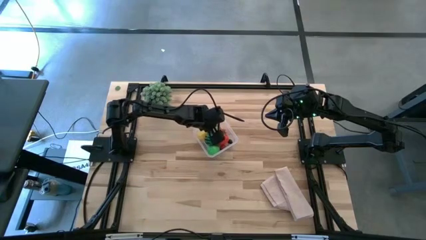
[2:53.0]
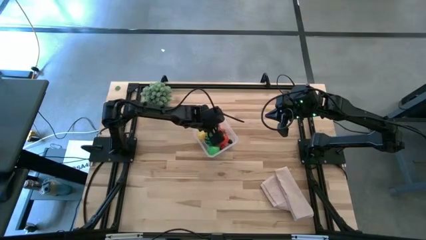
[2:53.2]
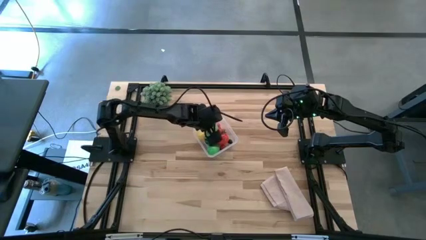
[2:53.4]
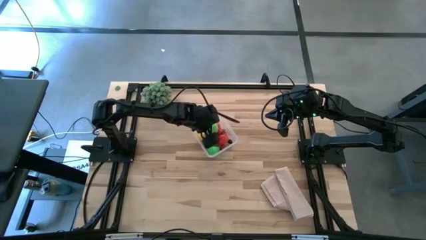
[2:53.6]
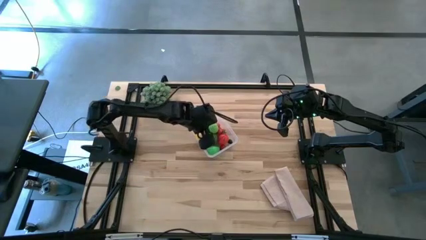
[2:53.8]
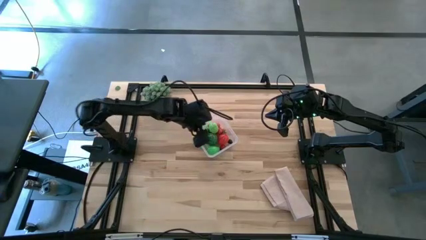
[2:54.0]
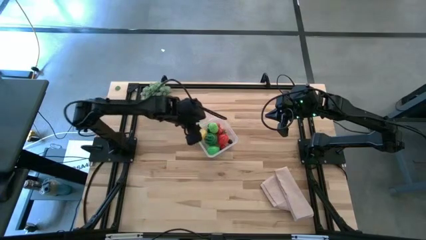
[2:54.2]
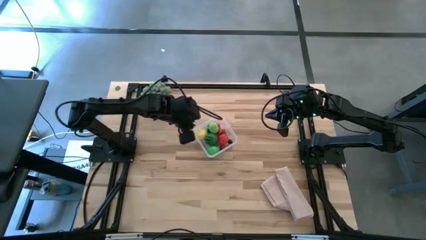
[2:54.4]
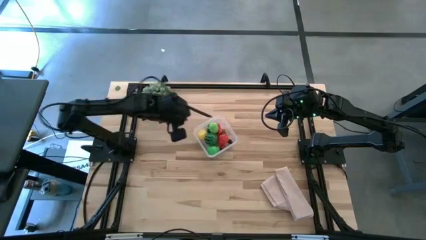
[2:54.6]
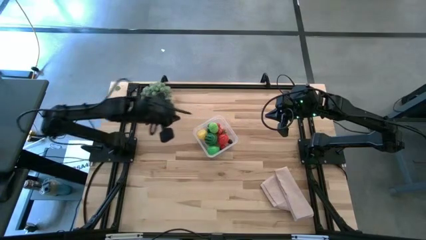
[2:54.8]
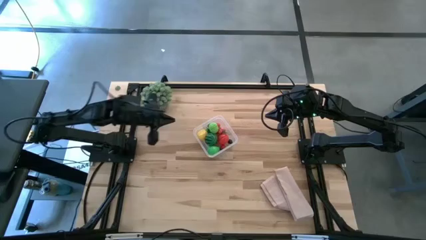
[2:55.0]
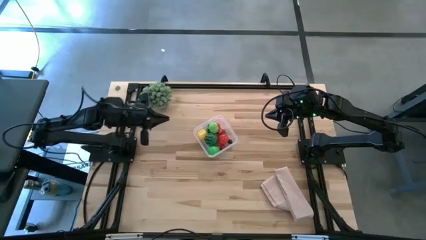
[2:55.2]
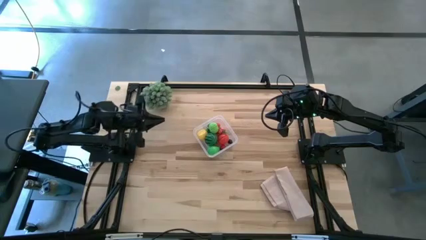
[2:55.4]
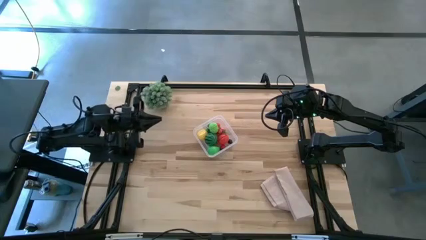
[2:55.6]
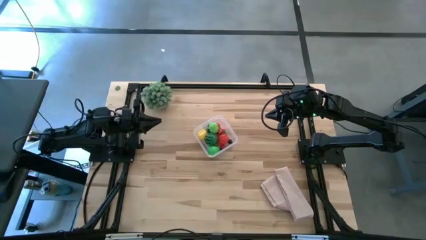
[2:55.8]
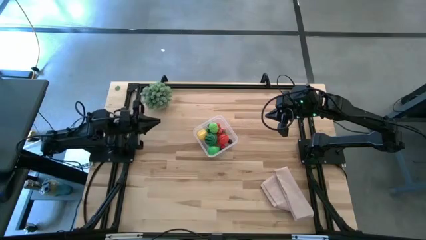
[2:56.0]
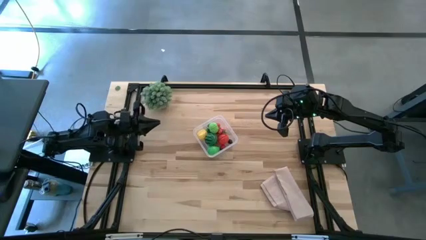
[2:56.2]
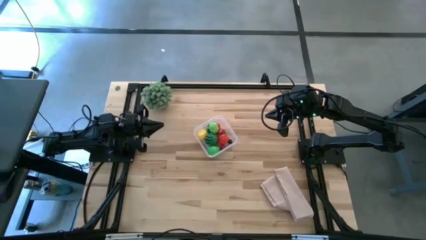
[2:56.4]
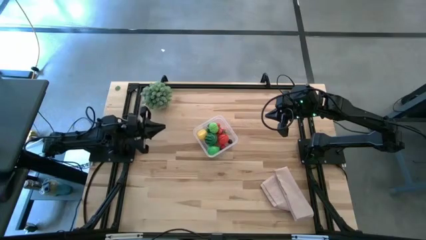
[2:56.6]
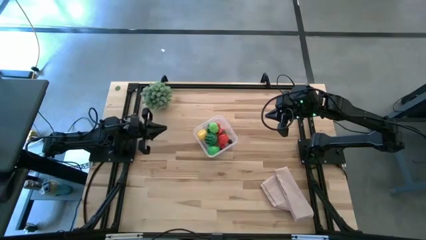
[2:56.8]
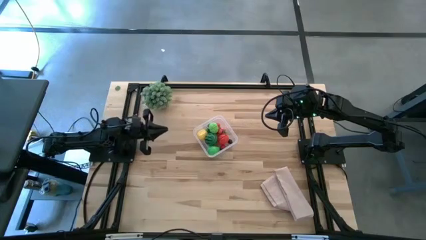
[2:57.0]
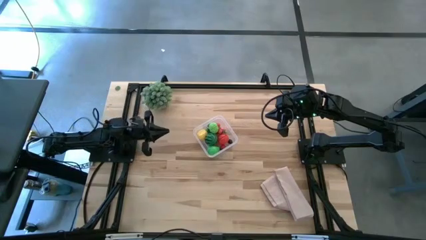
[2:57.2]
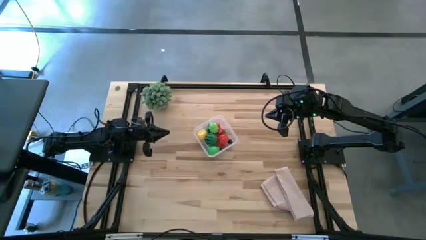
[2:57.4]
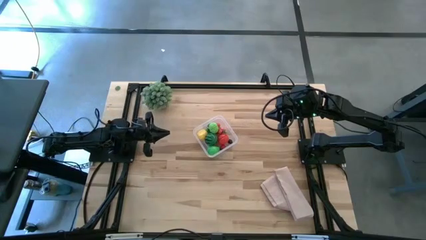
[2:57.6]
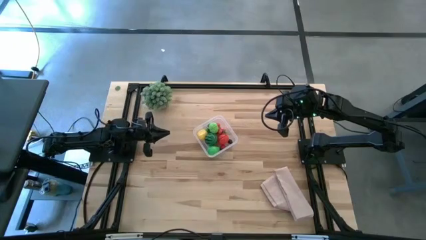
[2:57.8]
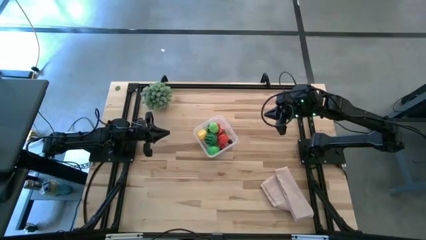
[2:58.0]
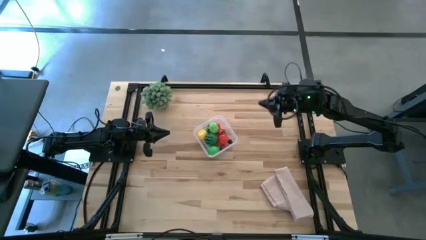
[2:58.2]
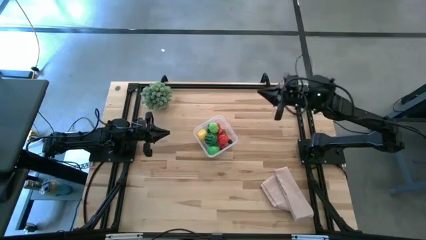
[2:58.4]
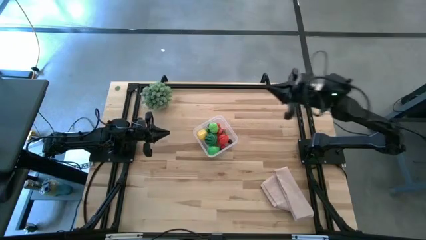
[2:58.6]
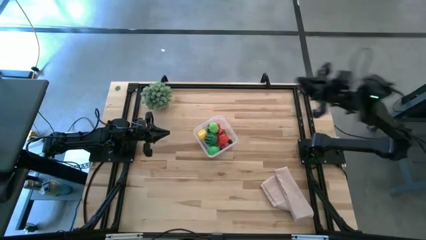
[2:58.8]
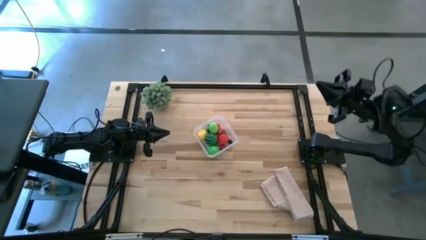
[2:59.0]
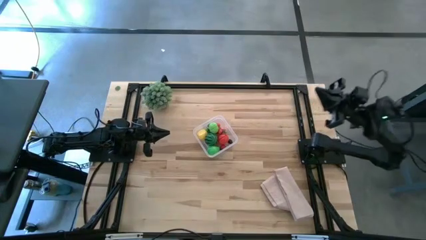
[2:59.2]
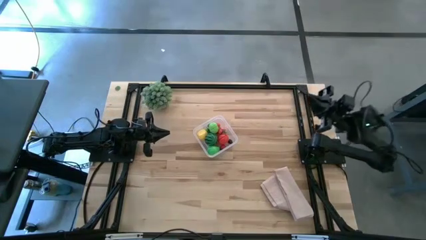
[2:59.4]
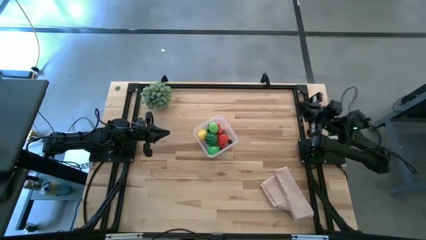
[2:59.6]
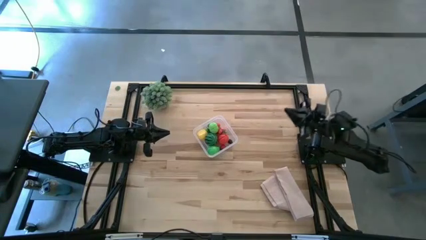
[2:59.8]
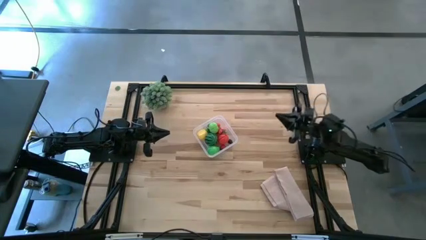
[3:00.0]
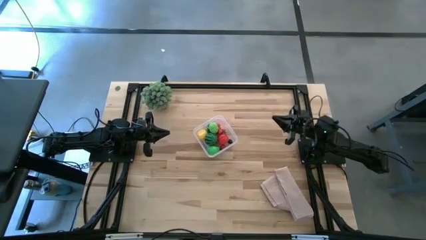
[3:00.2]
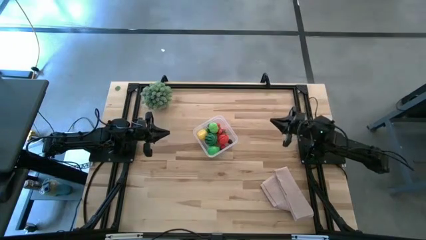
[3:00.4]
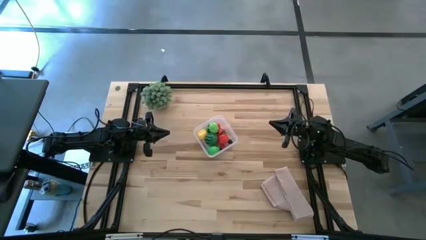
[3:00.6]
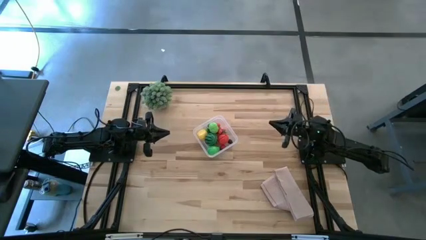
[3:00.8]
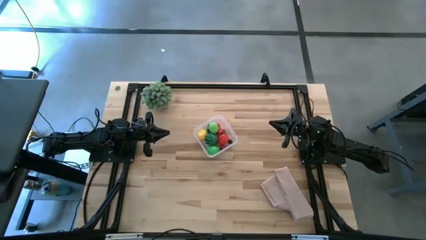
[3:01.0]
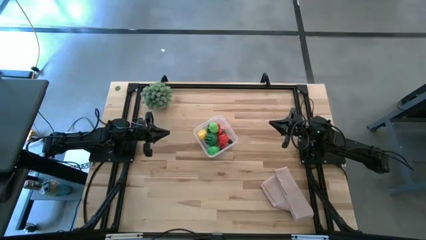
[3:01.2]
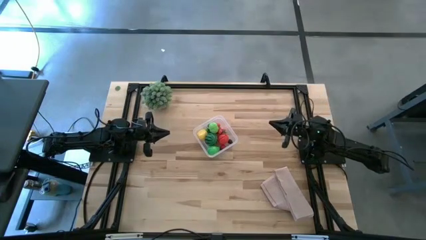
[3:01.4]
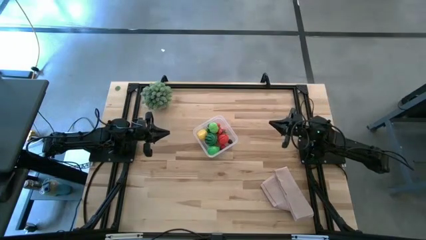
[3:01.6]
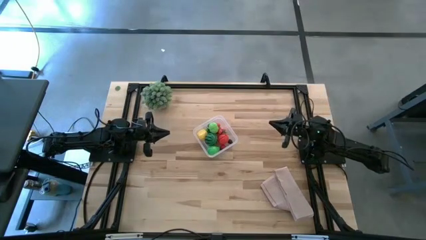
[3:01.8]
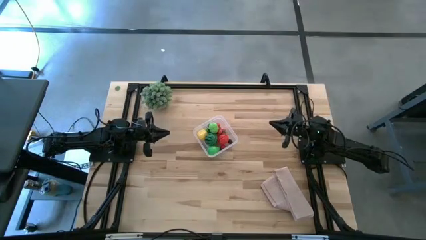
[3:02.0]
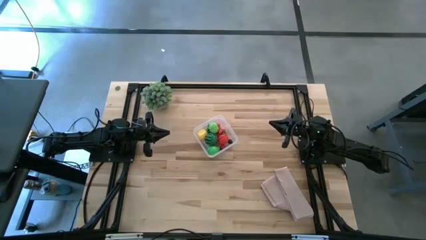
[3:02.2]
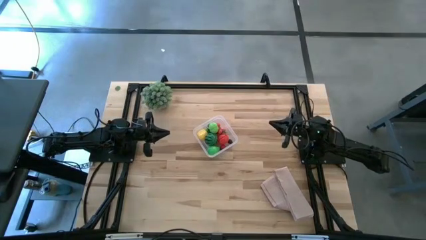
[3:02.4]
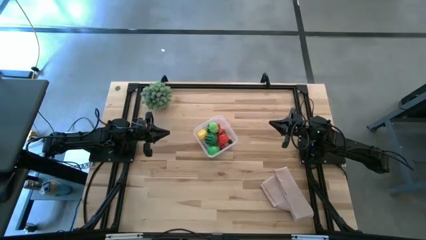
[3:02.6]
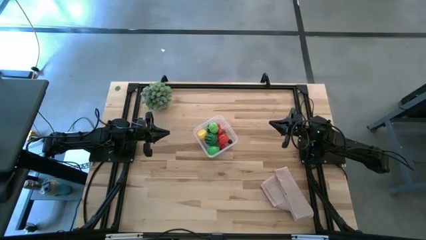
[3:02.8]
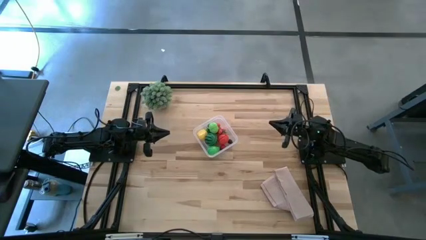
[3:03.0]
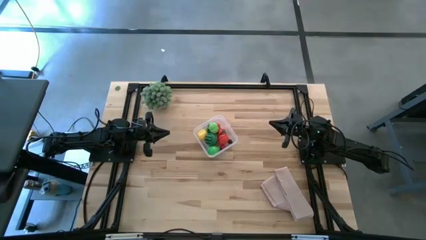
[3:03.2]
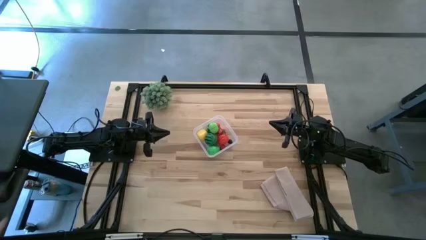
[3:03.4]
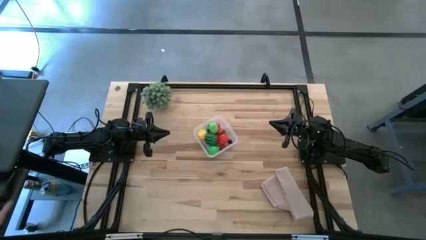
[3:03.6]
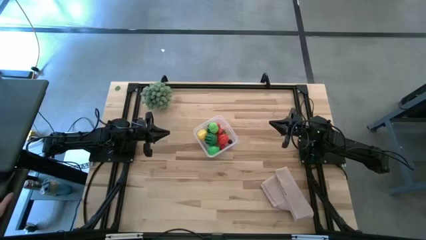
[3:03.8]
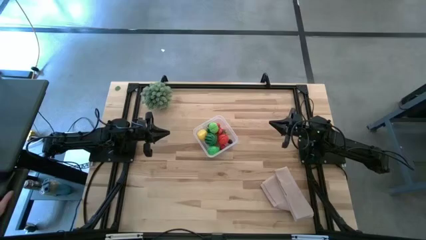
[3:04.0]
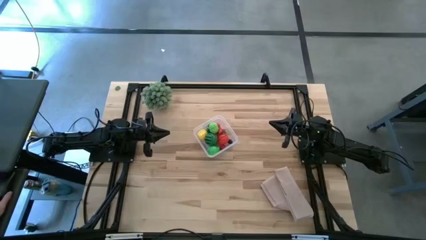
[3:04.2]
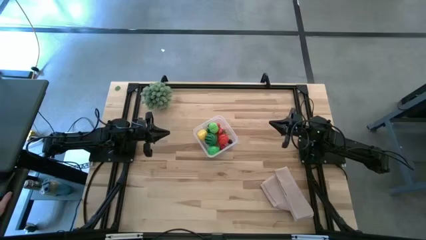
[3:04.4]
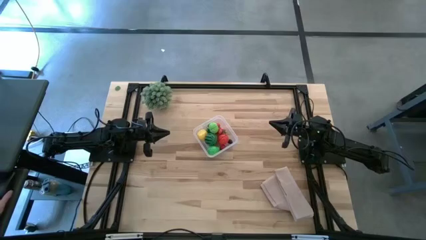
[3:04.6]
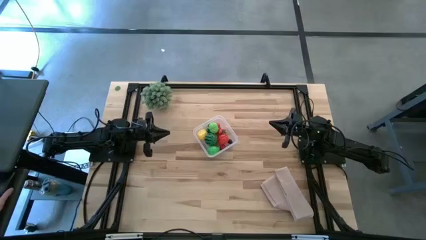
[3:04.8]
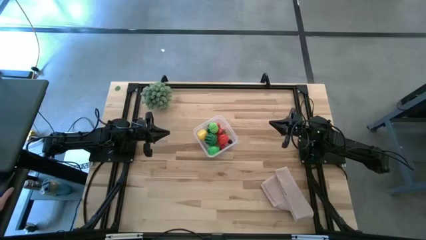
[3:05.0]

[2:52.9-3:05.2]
Task: Pick and placing Produce into tupperware
Return to Home Position

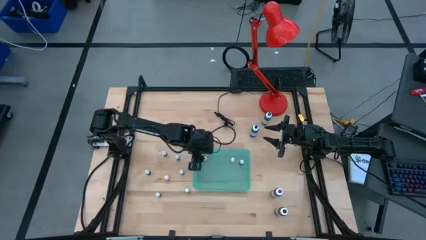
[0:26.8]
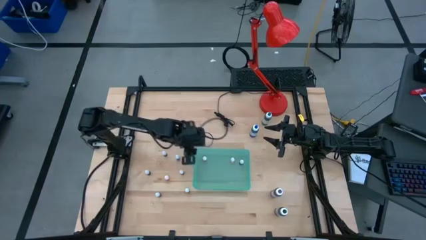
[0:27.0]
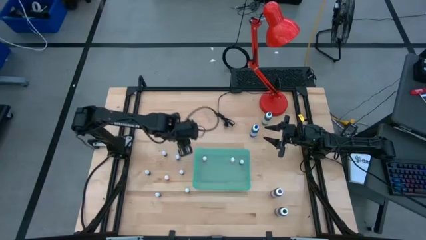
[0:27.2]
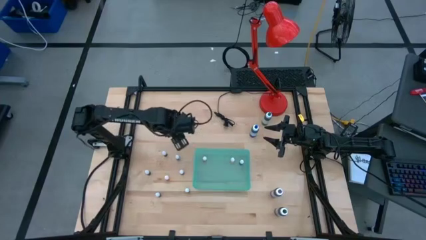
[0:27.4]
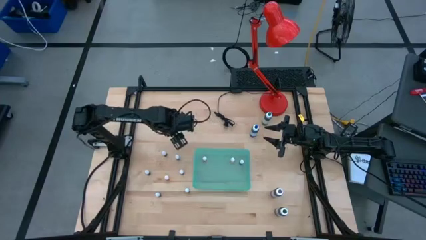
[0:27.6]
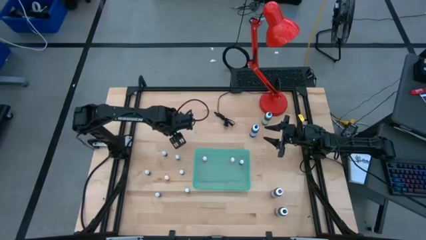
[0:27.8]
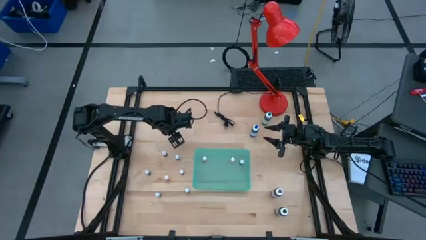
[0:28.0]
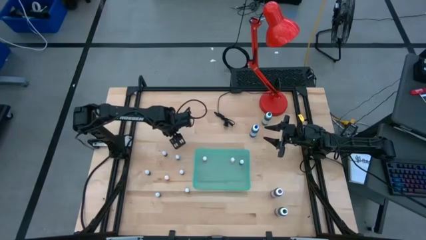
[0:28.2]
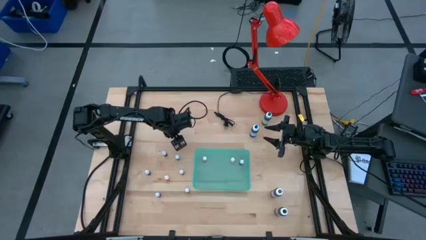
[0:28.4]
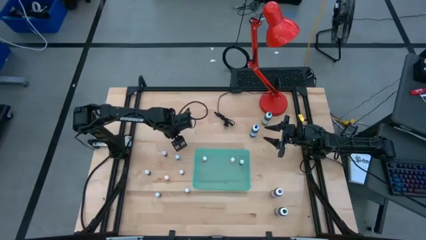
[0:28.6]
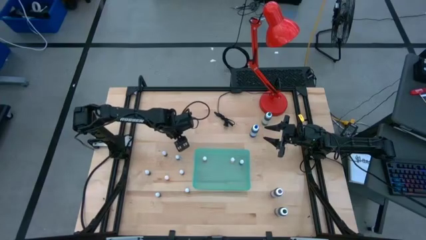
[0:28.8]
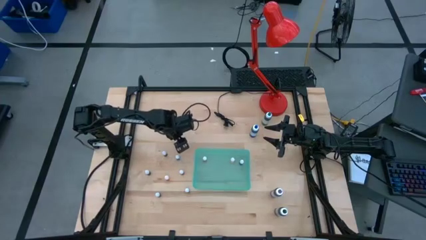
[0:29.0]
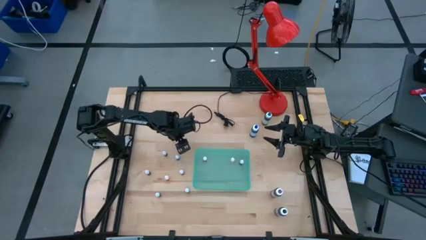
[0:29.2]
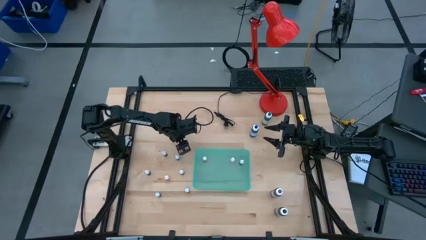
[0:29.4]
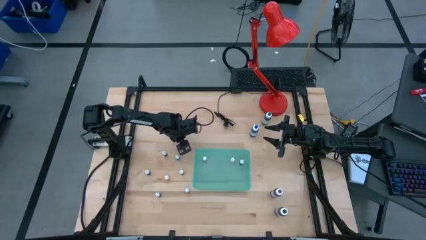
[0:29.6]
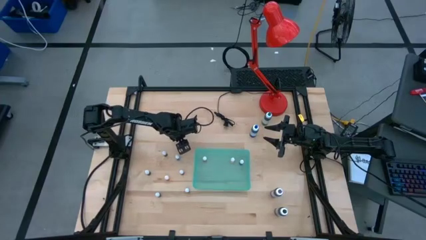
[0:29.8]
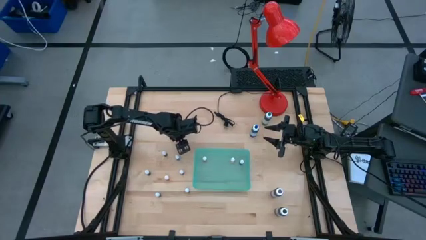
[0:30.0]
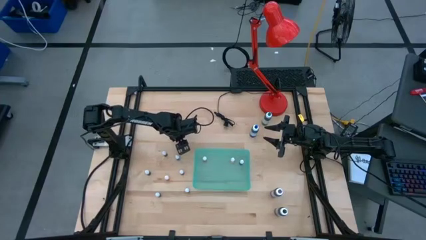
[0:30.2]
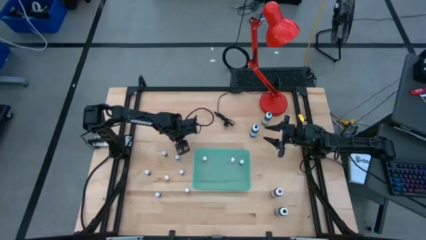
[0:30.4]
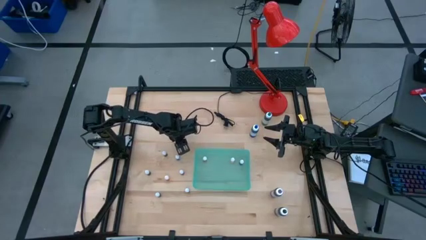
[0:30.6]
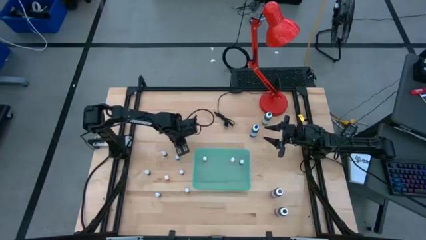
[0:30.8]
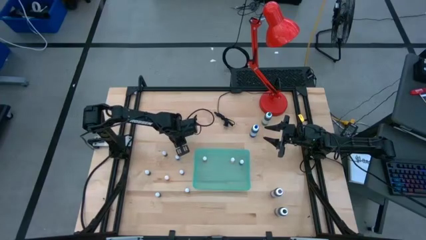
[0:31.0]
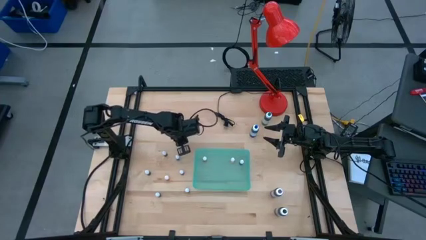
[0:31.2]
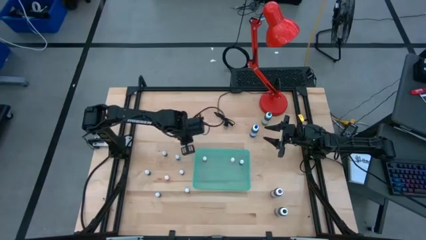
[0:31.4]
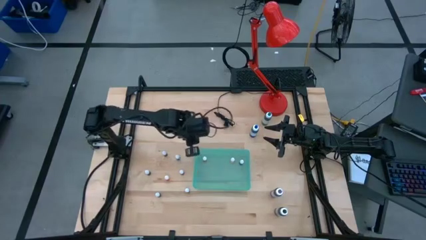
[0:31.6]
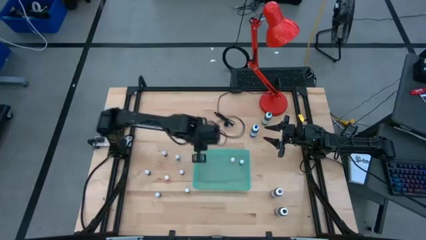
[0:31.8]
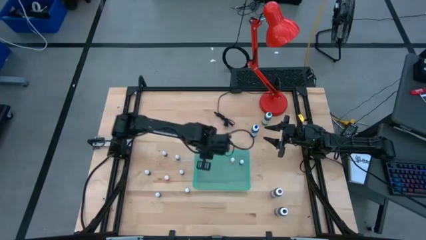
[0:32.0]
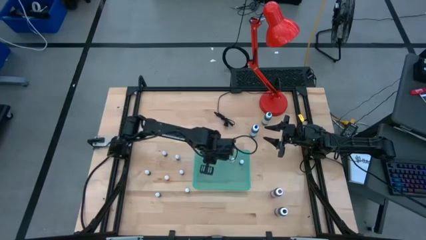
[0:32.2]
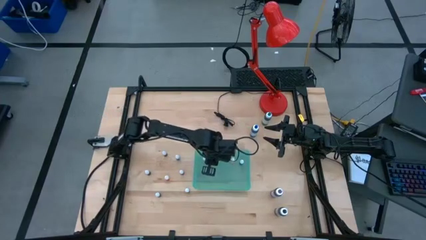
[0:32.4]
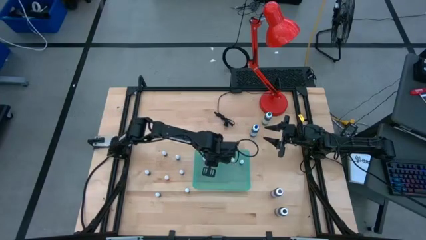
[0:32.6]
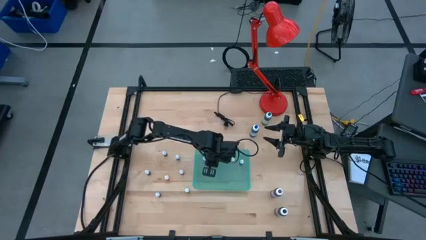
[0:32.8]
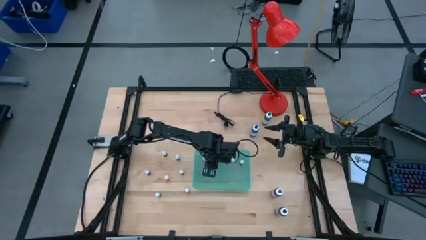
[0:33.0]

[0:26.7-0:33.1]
Task: Pick & Place food coloring
Put the small yellow food coloring bottle into the light blue bin
